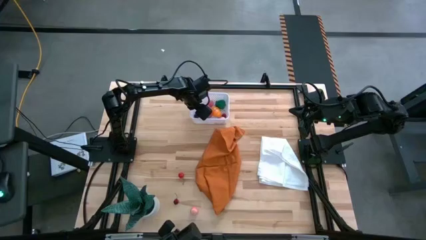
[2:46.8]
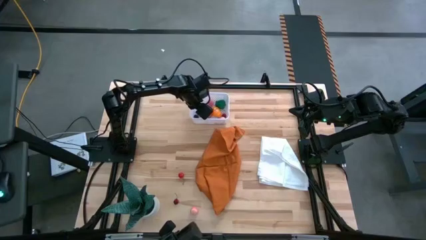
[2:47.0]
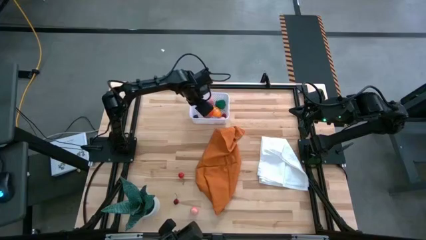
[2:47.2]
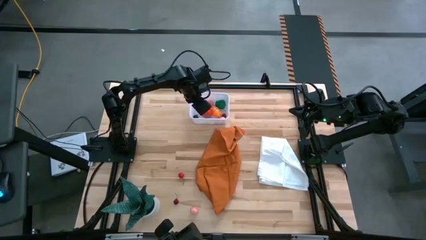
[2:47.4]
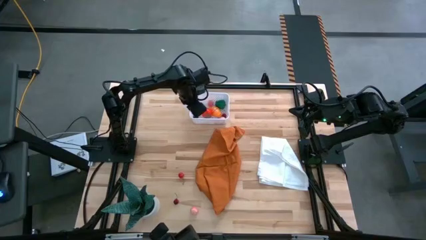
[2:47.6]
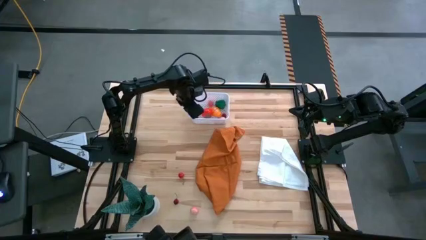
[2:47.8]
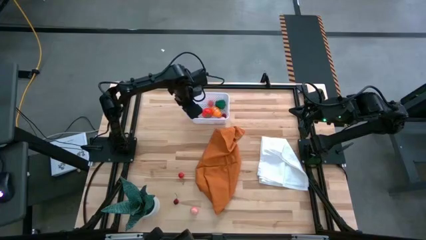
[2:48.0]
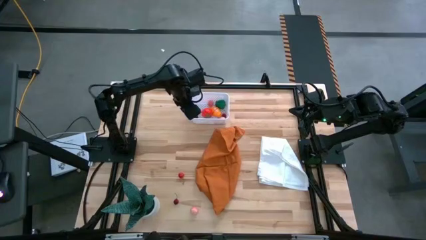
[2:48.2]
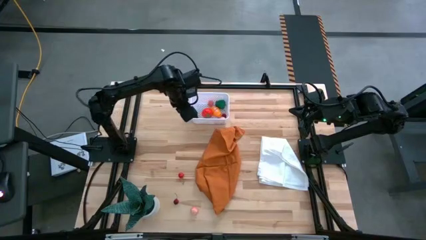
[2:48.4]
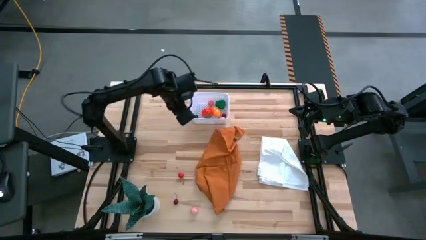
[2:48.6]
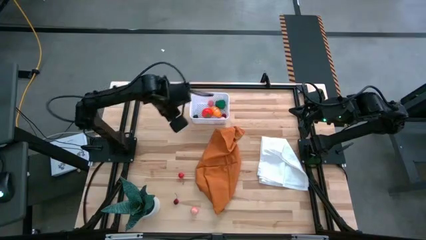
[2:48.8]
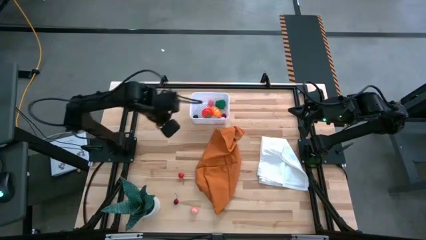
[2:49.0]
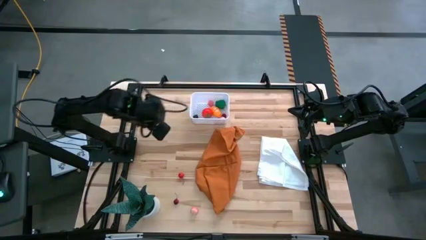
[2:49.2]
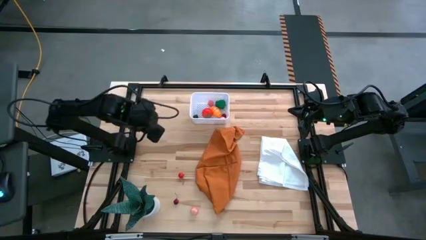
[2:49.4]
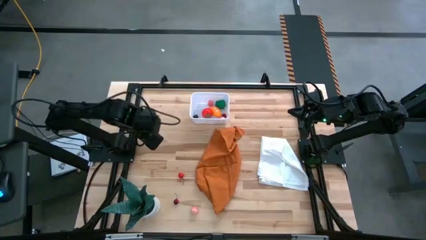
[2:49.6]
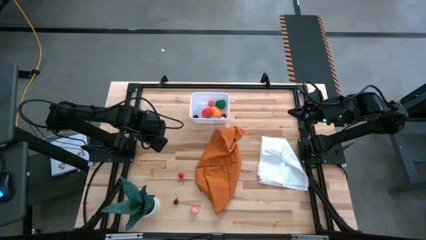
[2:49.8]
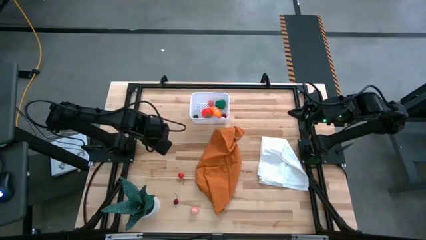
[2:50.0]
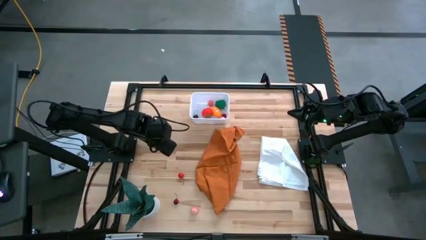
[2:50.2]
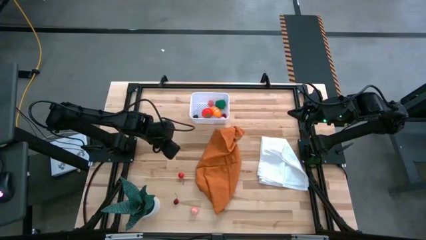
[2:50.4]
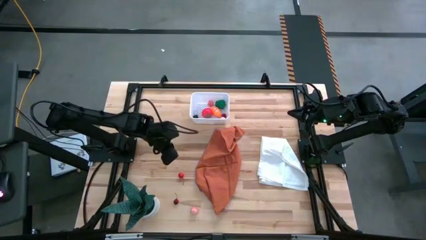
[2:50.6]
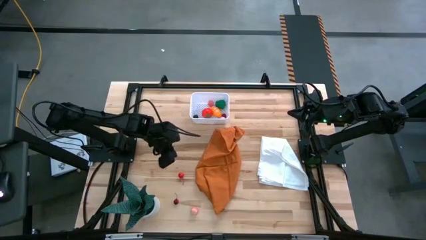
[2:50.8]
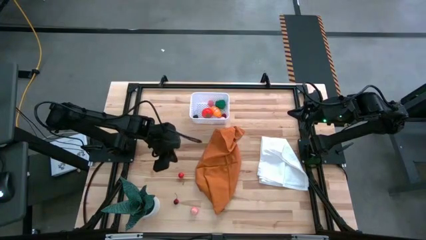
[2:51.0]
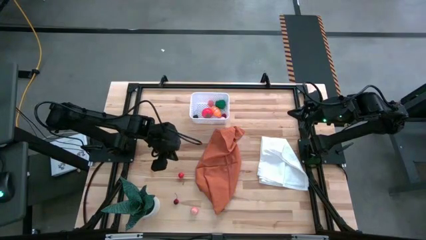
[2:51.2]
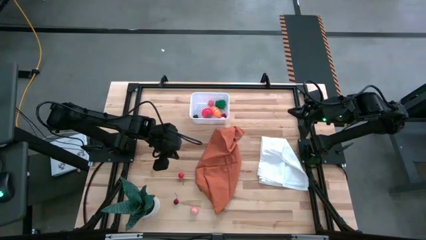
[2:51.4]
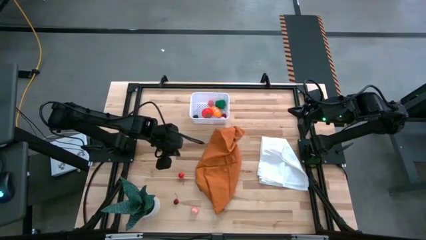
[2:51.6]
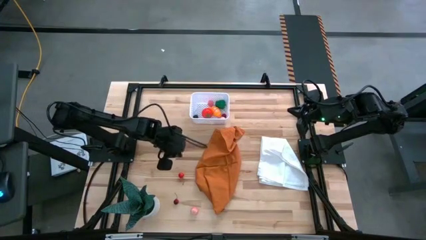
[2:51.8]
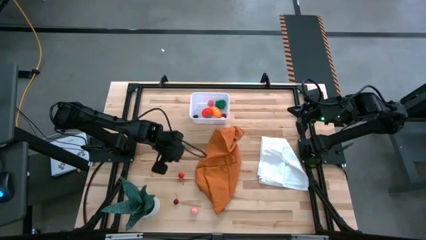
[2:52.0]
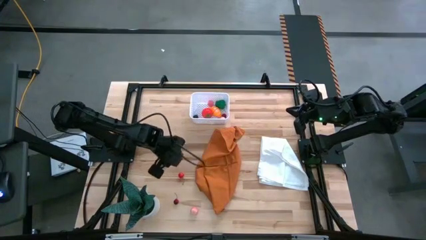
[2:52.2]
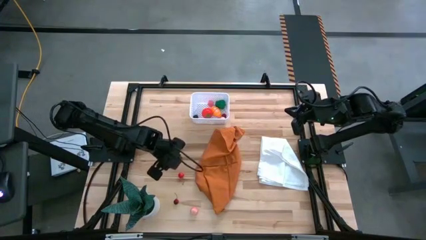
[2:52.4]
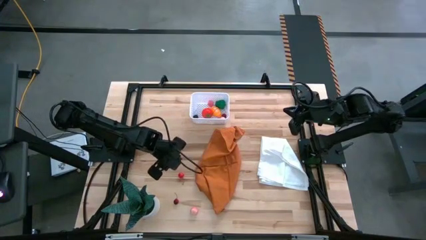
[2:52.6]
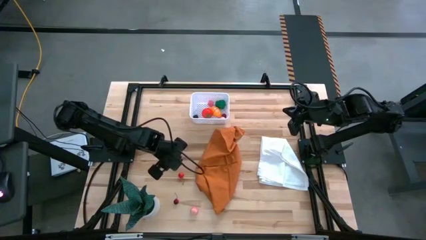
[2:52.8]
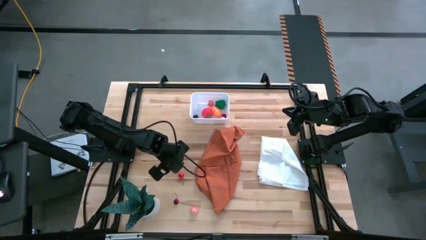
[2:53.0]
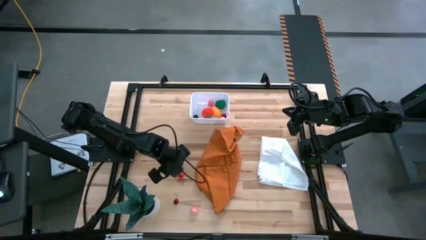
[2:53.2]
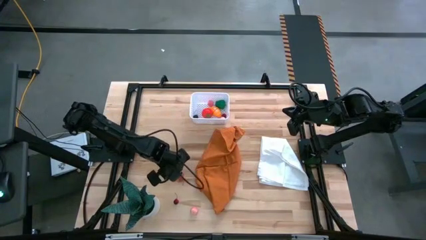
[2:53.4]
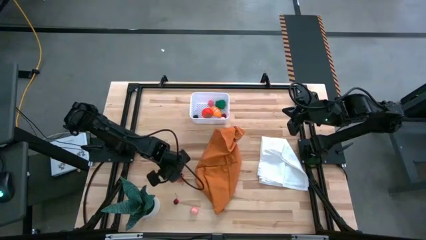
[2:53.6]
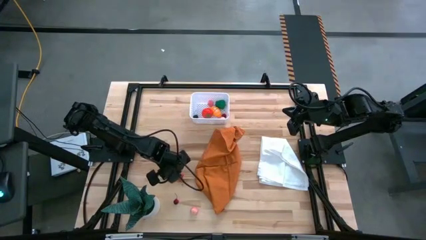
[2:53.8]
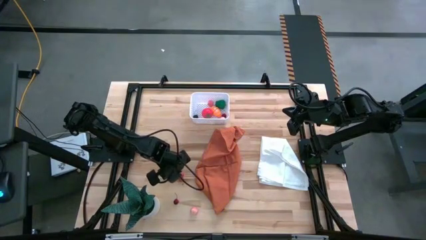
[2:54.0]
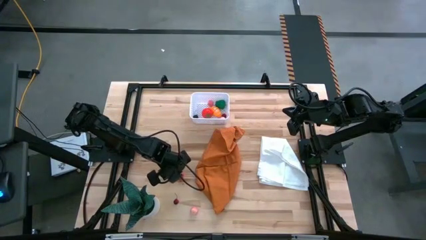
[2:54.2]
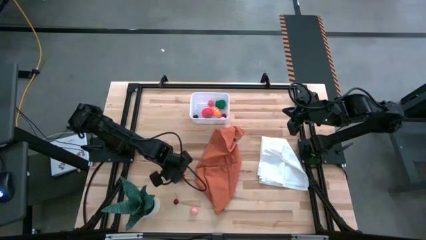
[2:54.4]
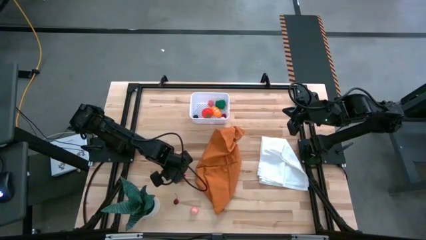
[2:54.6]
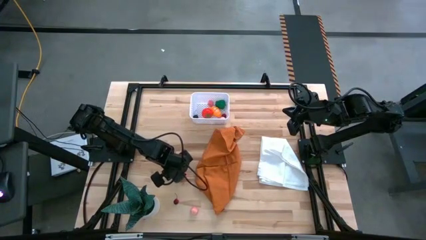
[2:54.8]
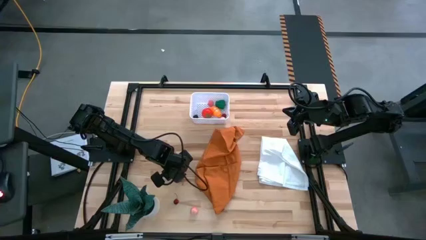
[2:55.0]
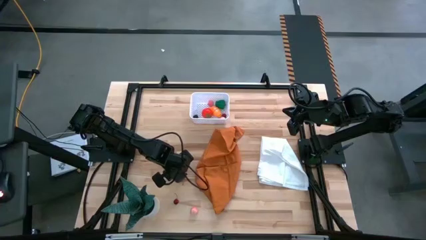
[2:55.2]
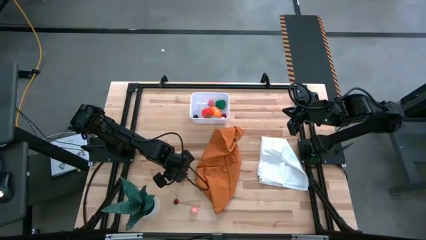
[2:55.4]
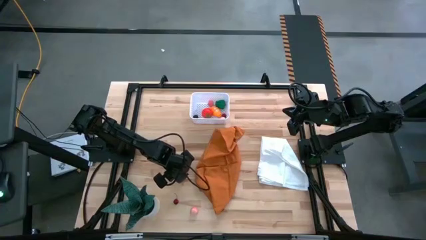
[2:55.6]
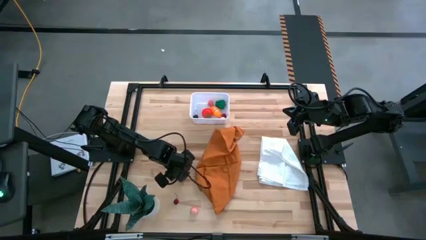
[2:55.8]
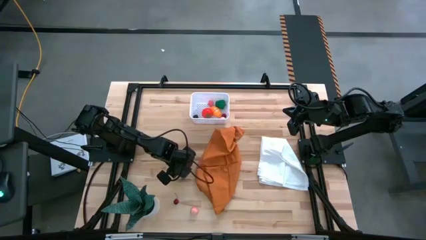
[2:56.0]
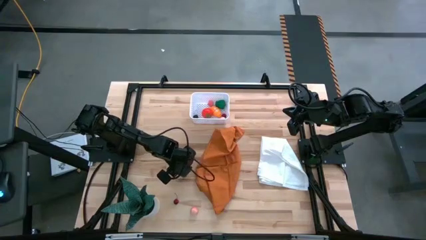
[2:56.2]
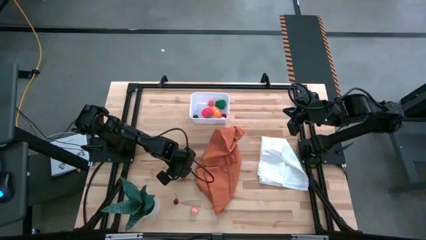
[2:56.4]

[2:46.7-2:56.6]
Task: Pick and placing Produce into tupperware
Put the top red cherry into the white basket
